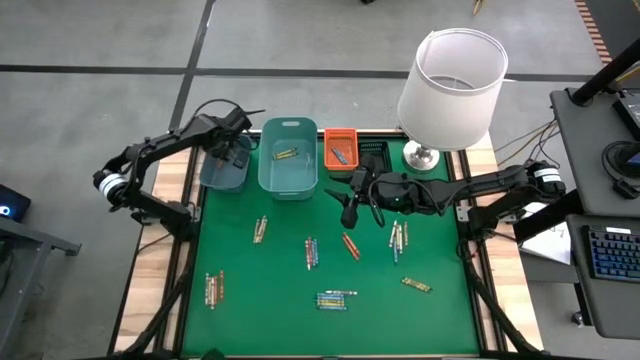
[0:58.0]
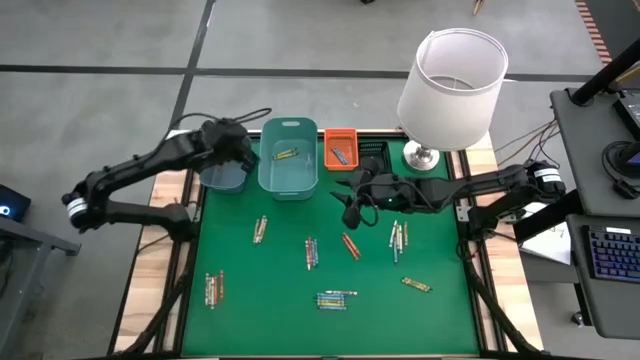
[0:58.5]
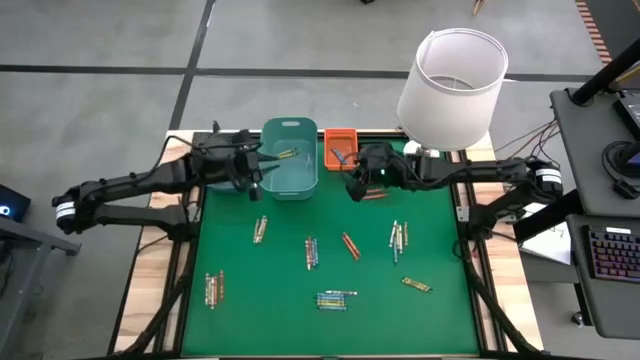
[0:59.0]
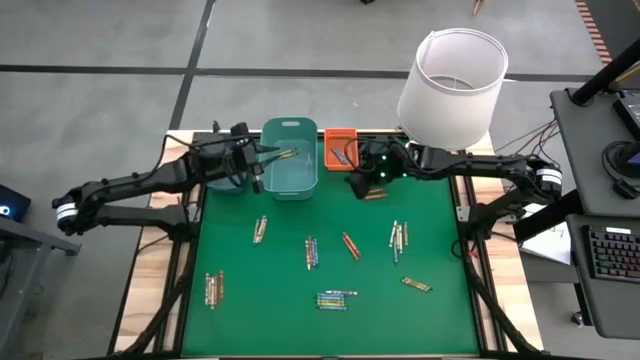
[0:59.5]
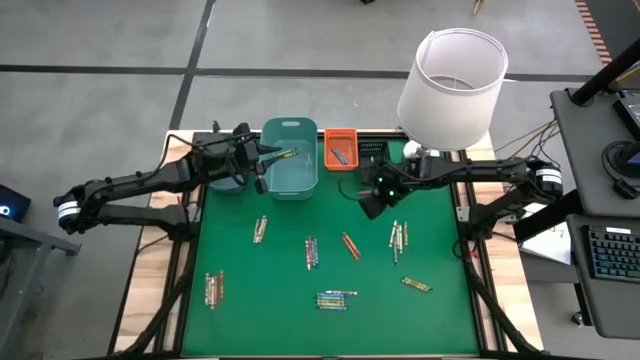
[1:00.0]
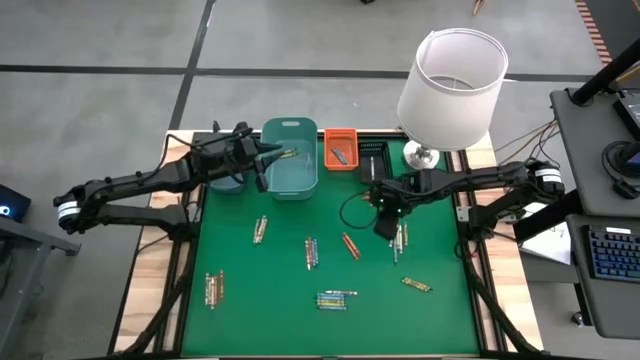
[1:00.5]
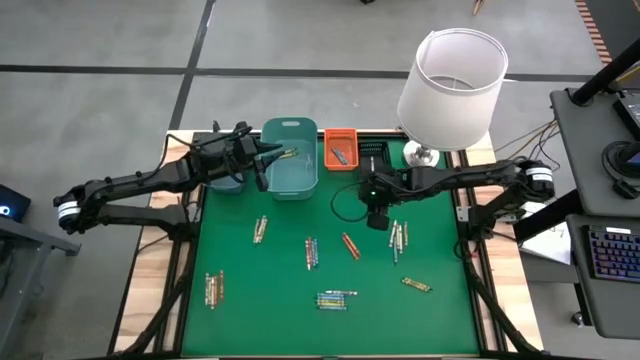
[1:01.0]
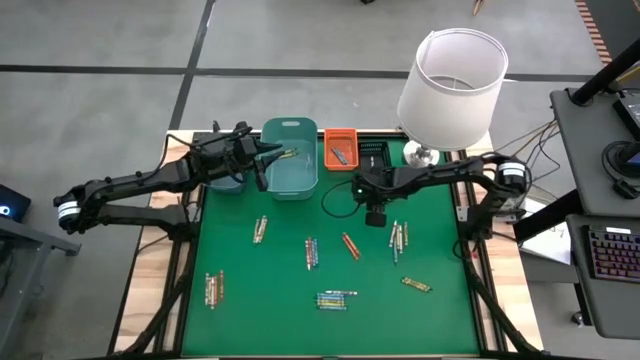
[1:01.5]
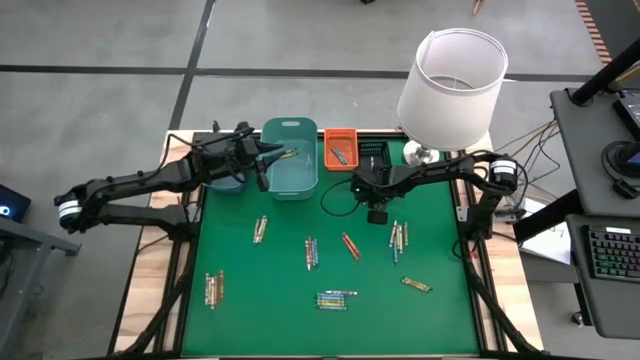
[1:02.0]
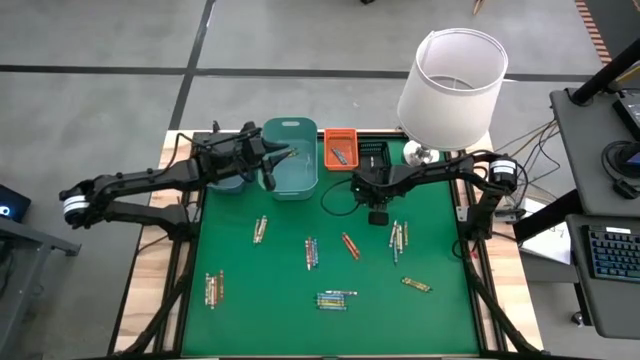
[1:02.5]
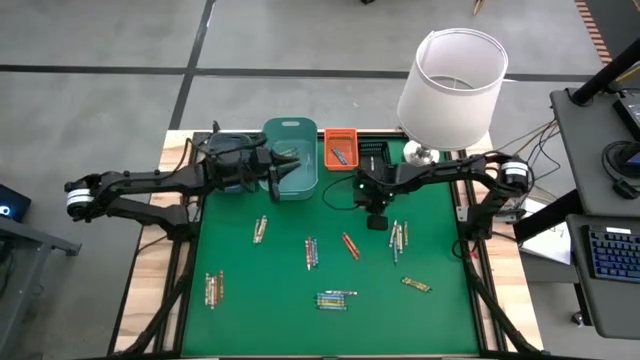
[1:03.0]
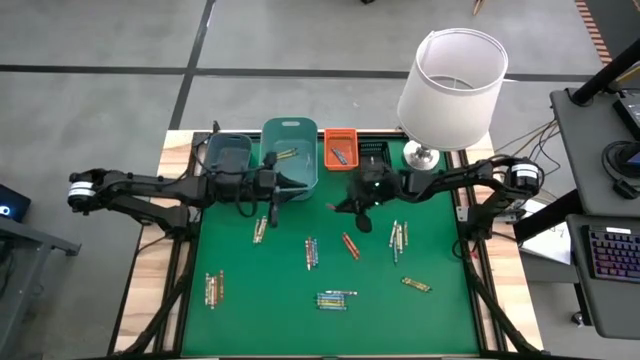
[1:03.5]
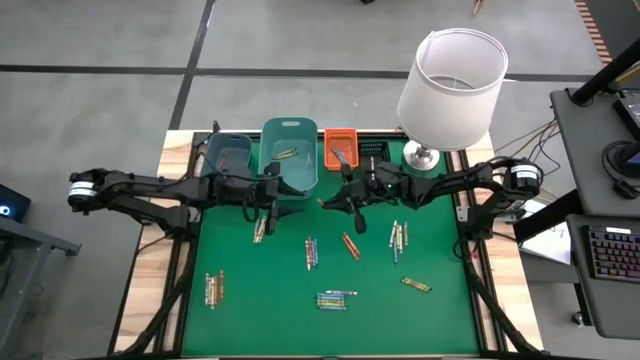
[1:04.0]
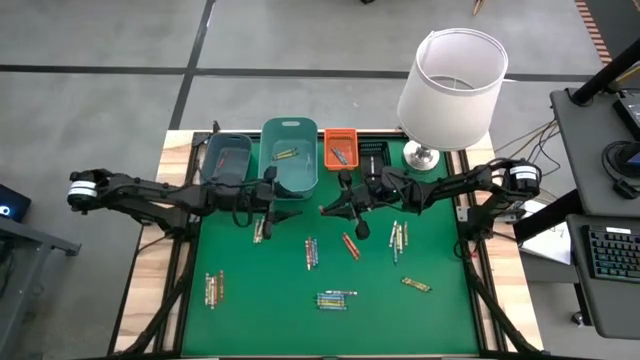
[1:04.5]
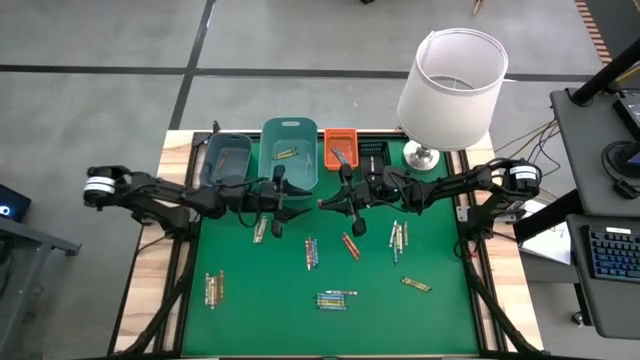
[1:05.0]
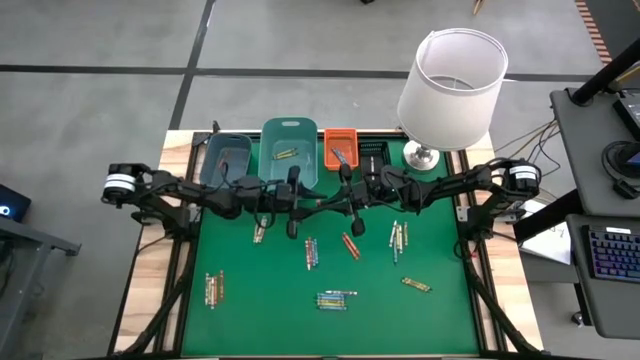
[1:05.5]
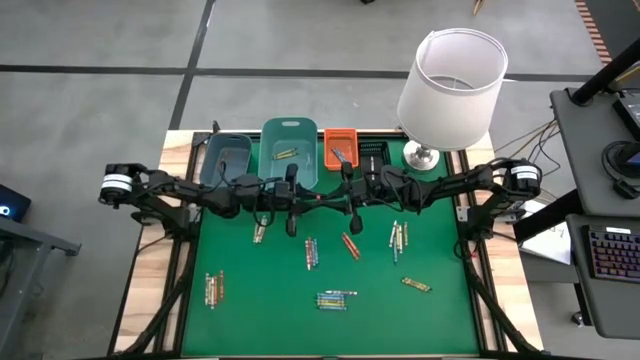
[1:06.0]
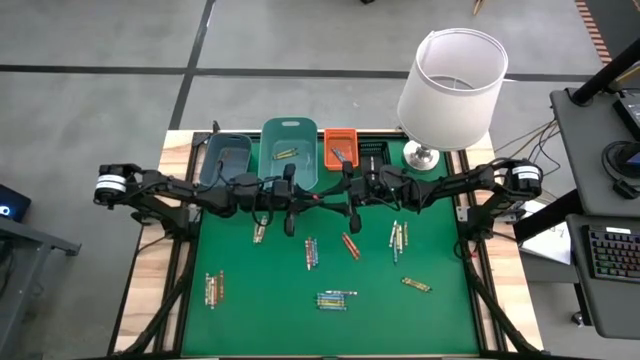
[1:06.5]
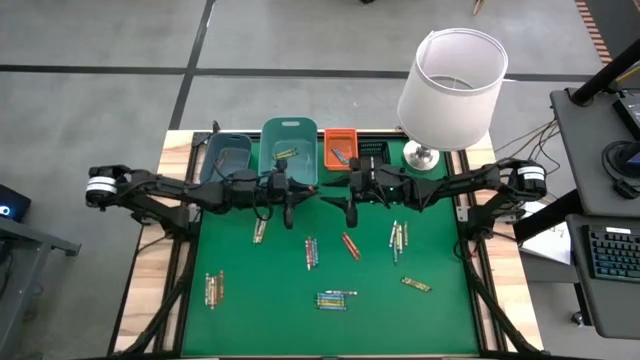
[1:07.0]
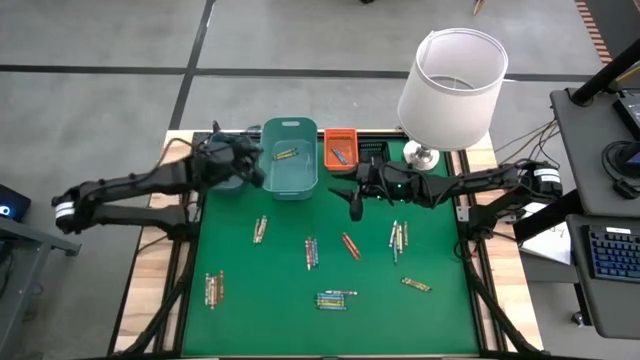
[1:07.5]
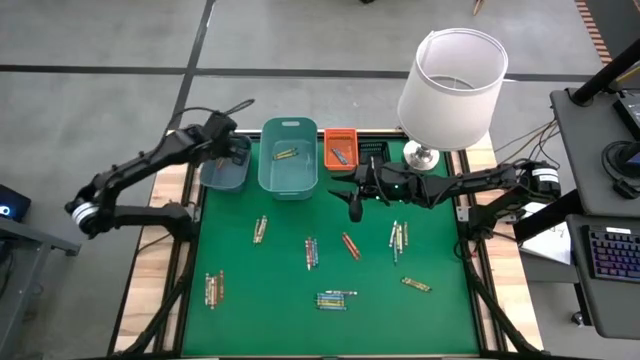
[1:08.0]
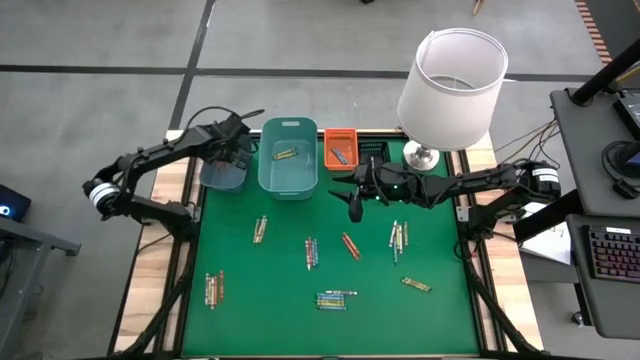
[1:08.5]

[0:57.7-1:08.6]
Task: Sort crayons
Put the orange crayon into the blue bin

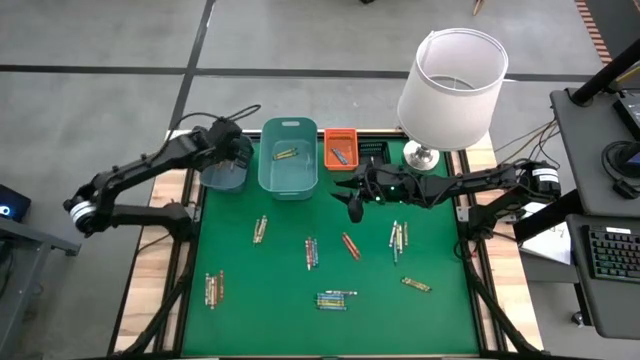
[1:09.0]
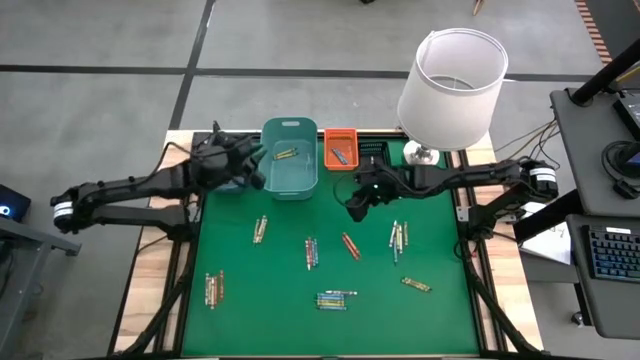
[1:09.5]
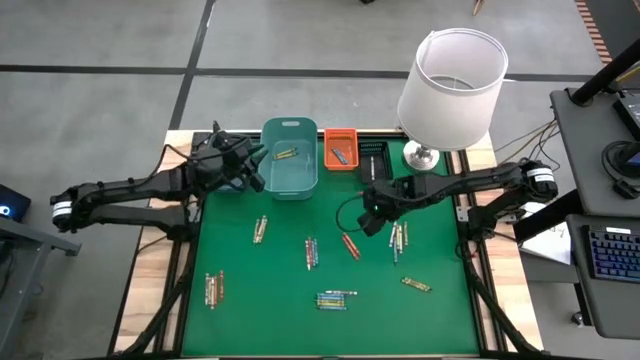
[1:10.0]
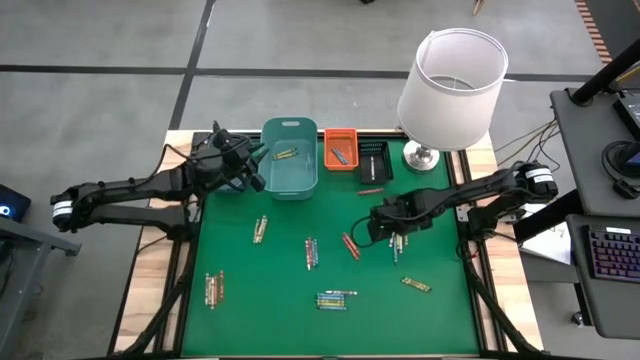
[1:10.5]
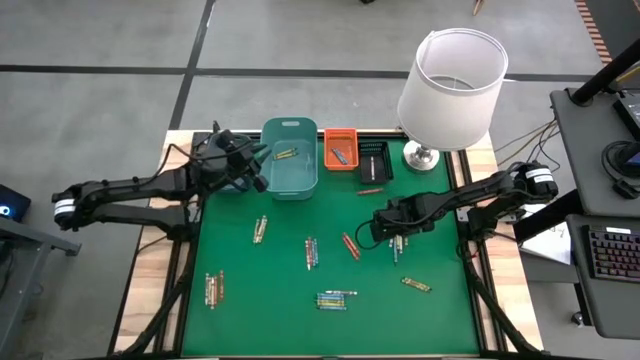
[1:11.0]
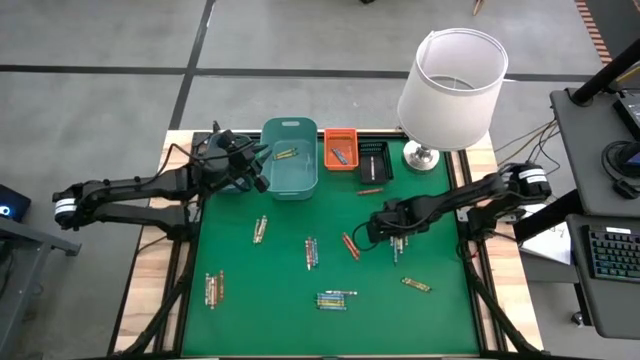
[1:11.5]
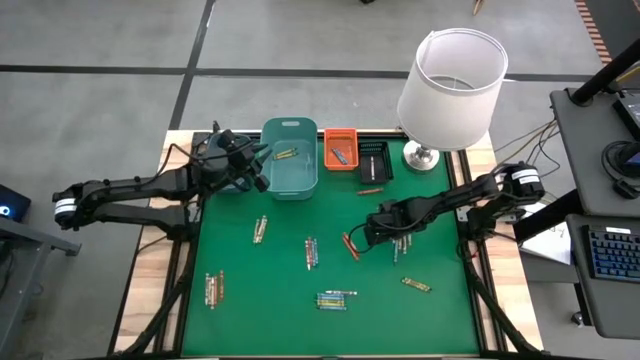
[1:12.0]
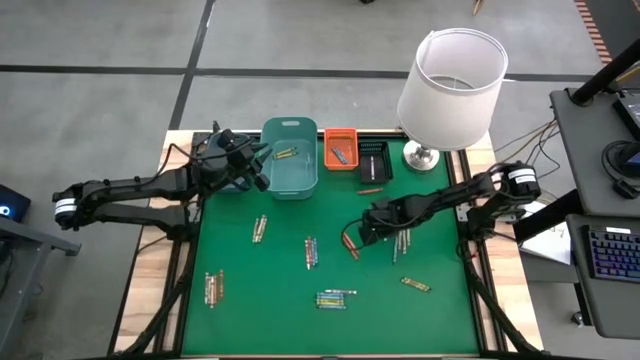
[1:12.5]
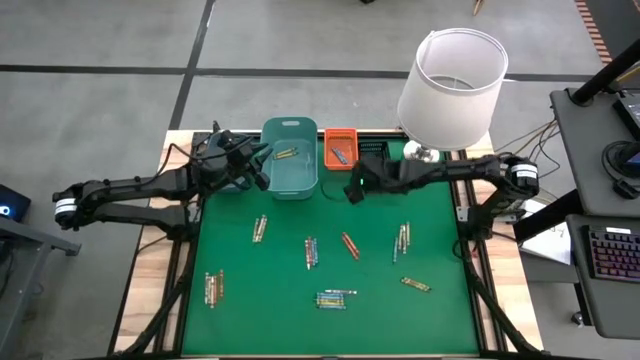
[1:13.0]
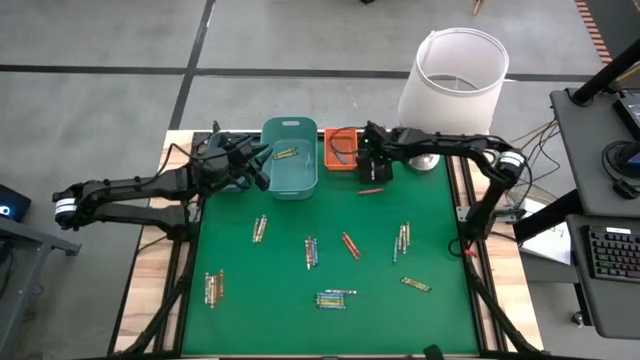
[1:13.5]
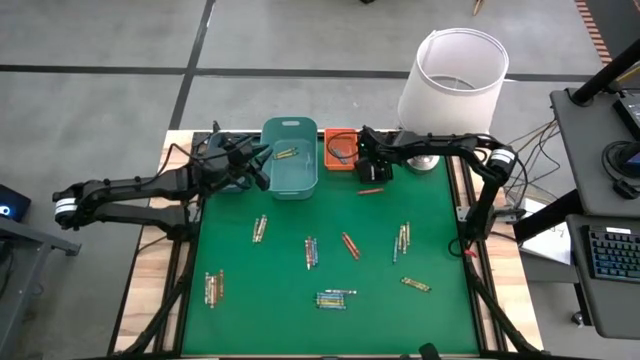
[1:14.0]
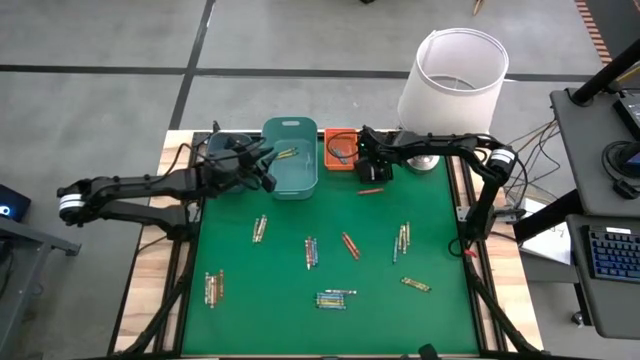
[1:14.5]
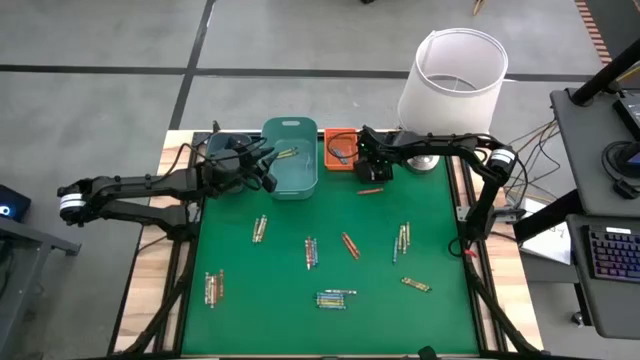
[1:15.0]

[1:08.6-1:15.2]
Put the white crayon into the black bin

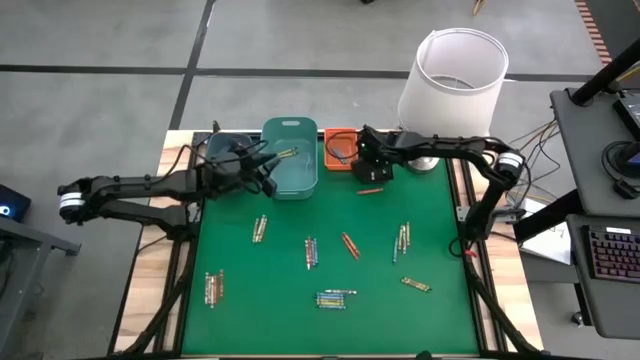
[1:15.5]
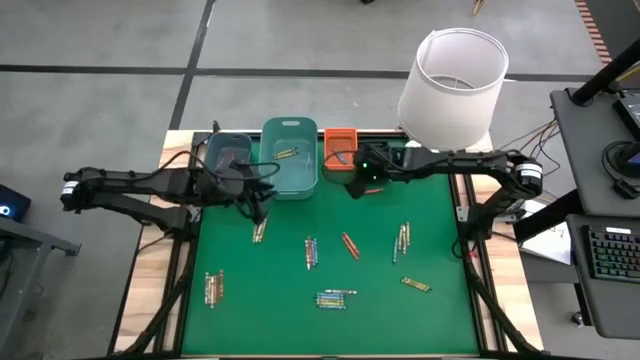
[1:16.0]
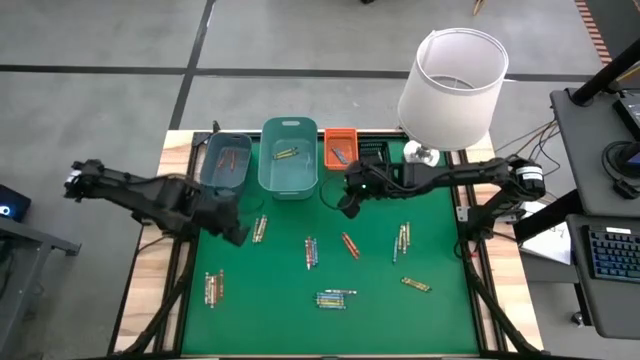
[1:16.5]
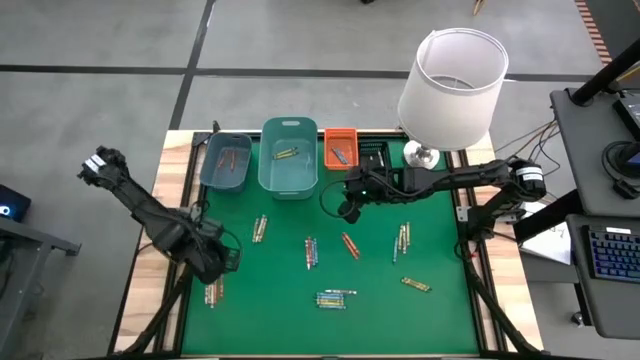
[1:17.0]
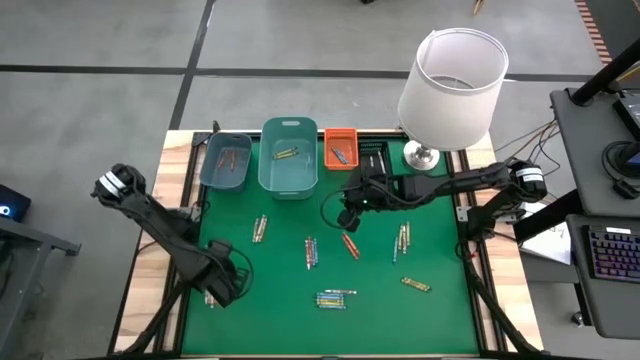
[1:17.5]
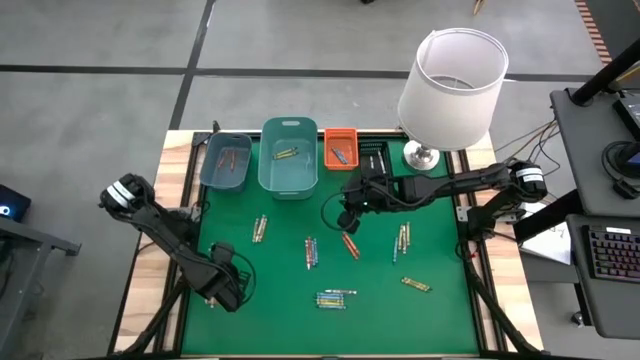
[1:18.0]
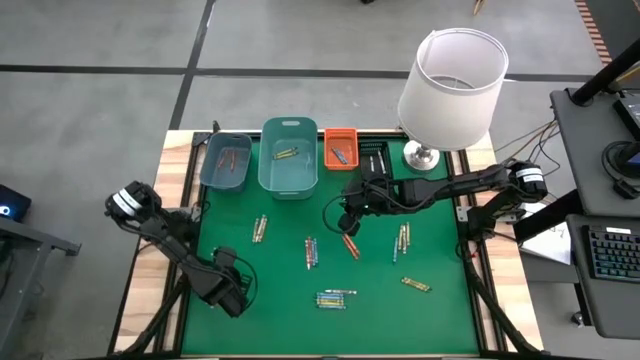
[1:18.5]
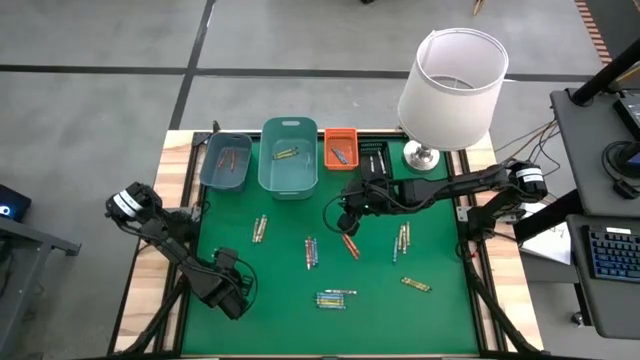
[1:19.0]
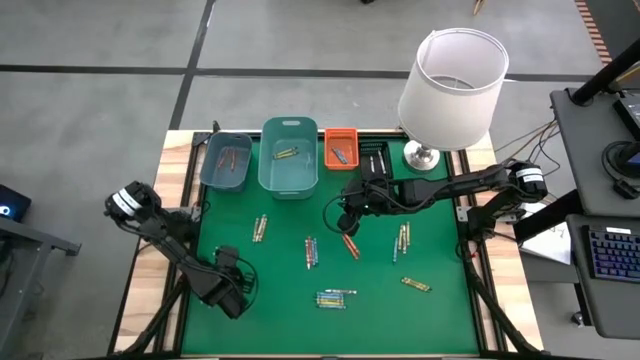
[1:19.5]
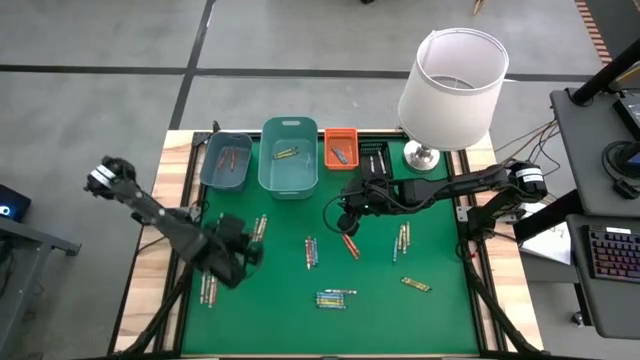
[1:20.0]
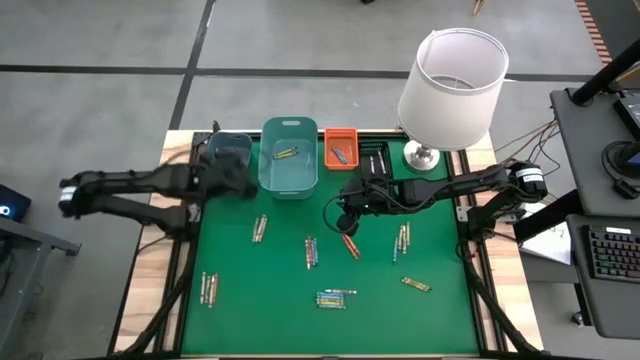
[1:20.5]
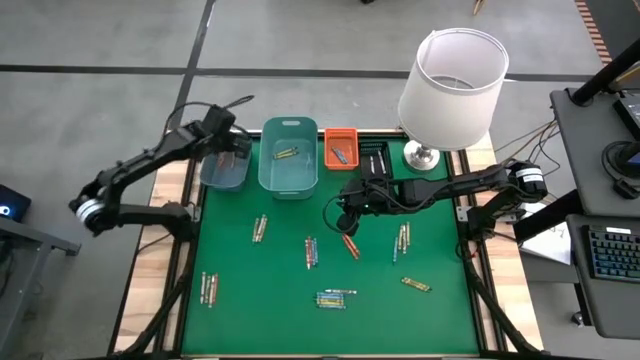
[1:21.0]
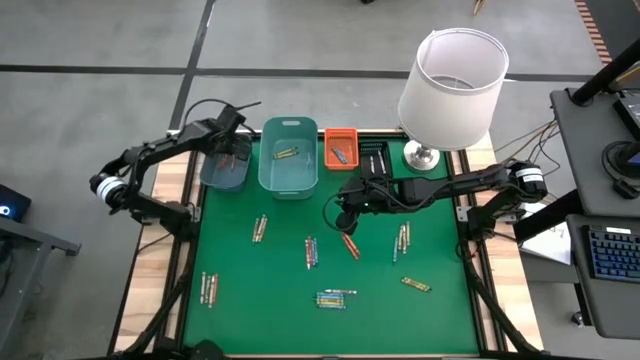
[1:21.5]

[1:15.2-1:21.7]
Put the orange crayon into the blue bin
